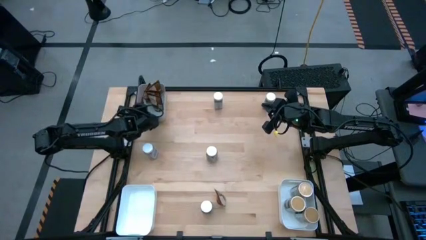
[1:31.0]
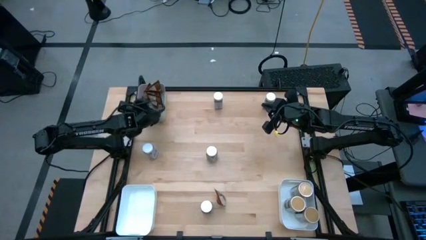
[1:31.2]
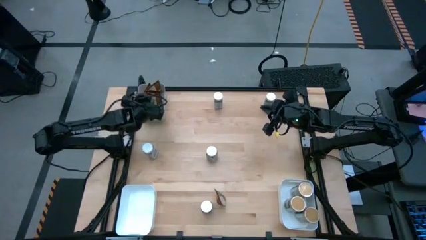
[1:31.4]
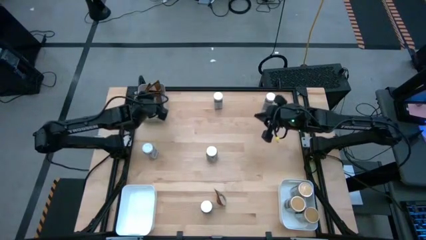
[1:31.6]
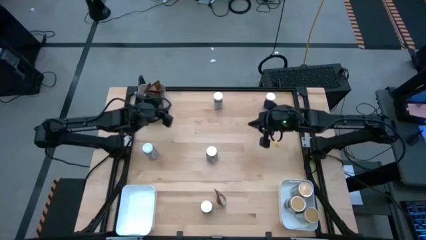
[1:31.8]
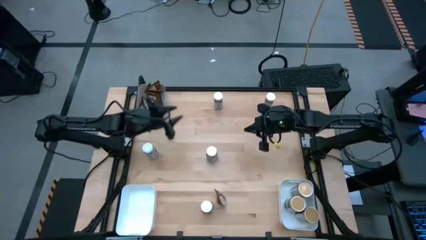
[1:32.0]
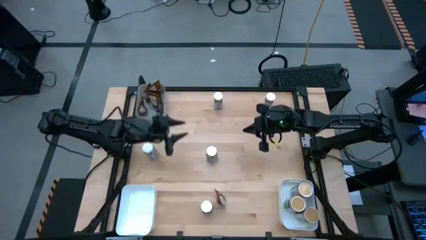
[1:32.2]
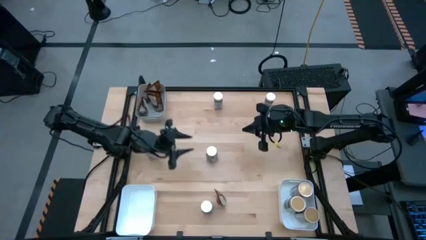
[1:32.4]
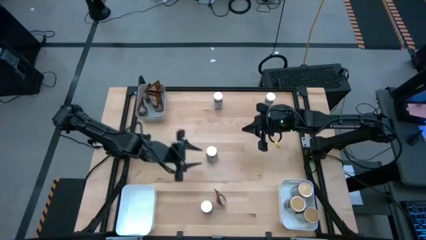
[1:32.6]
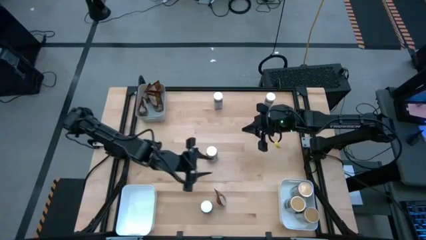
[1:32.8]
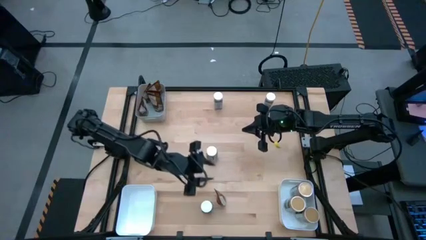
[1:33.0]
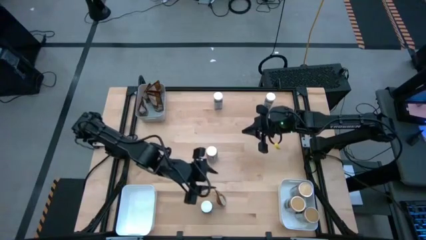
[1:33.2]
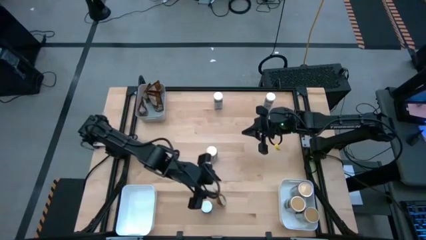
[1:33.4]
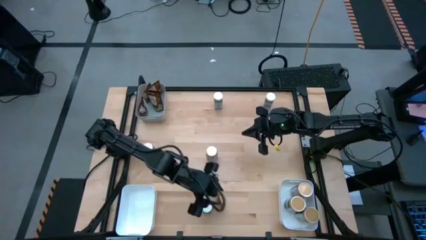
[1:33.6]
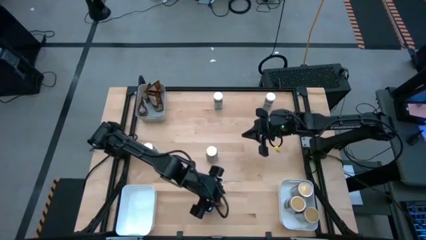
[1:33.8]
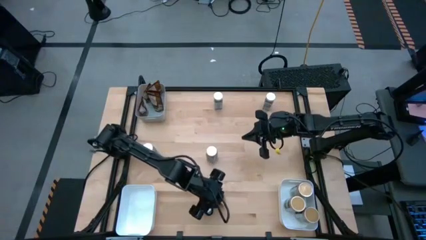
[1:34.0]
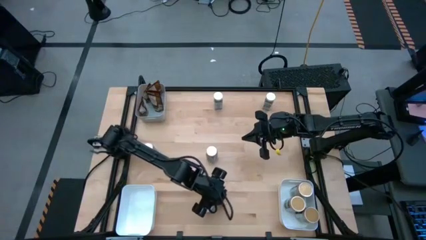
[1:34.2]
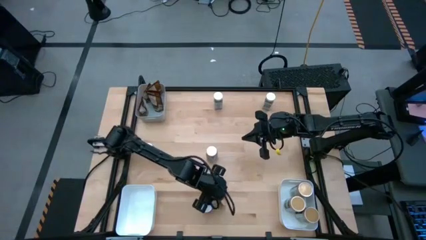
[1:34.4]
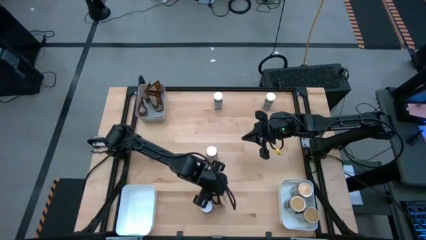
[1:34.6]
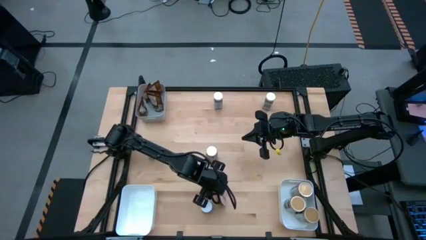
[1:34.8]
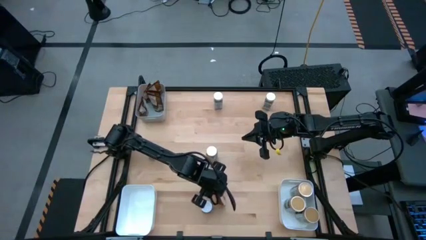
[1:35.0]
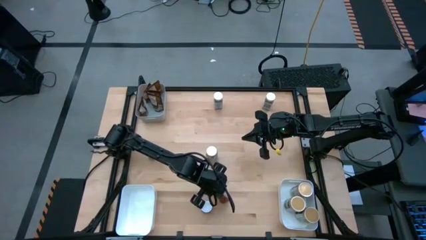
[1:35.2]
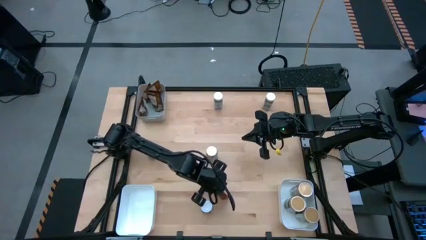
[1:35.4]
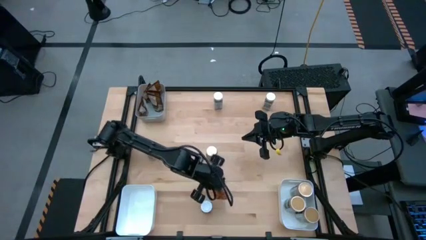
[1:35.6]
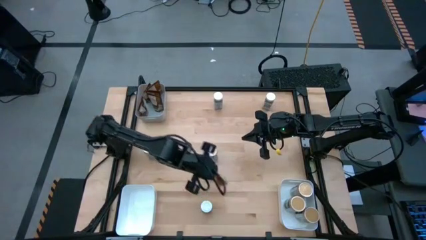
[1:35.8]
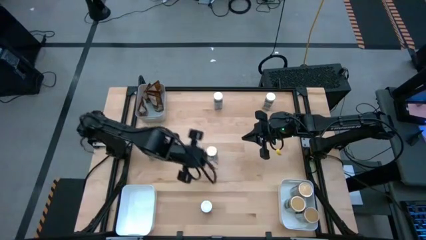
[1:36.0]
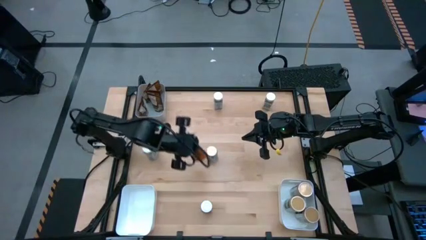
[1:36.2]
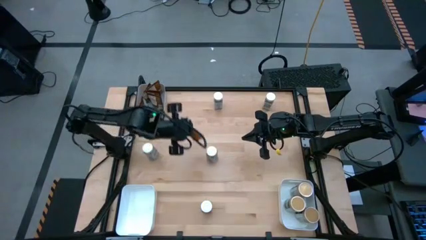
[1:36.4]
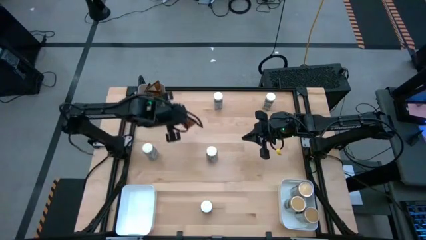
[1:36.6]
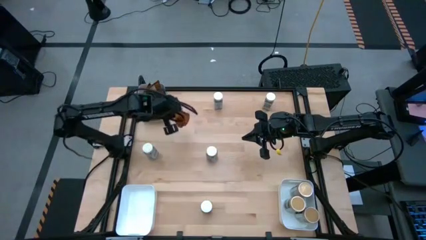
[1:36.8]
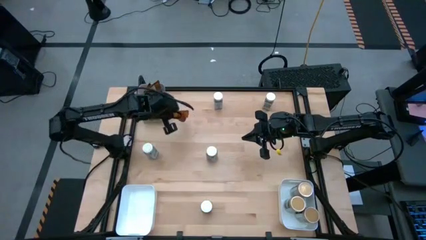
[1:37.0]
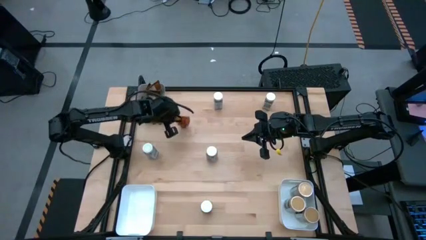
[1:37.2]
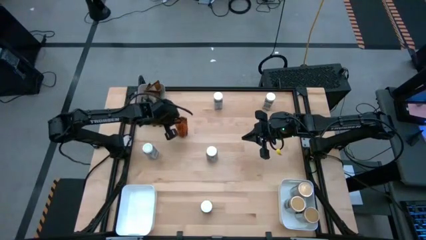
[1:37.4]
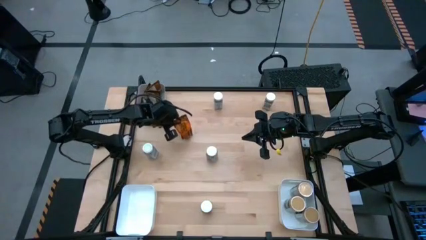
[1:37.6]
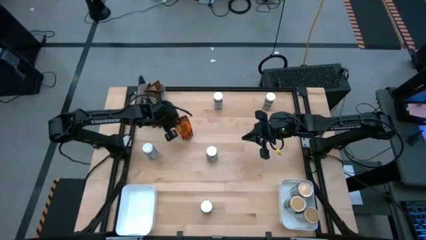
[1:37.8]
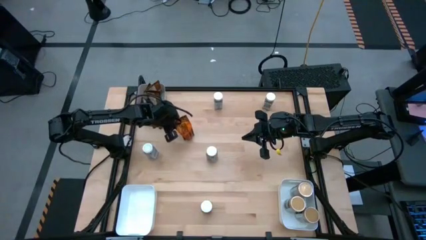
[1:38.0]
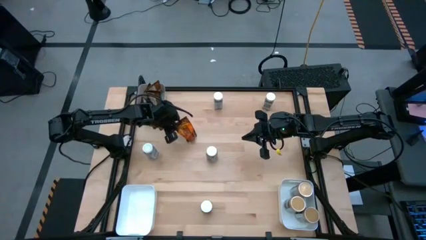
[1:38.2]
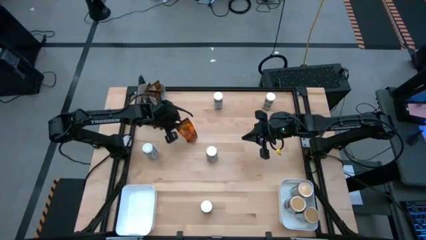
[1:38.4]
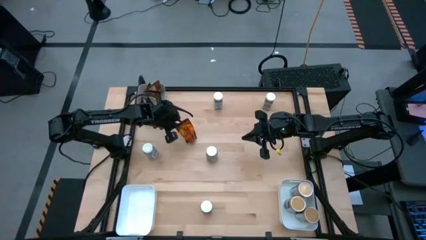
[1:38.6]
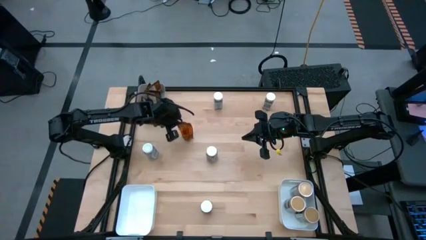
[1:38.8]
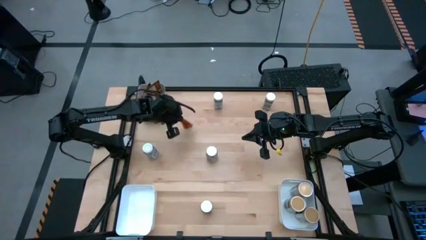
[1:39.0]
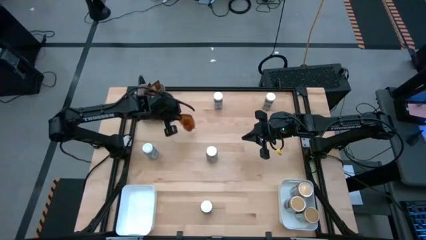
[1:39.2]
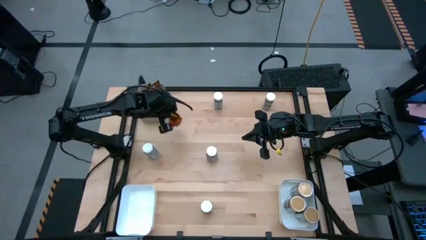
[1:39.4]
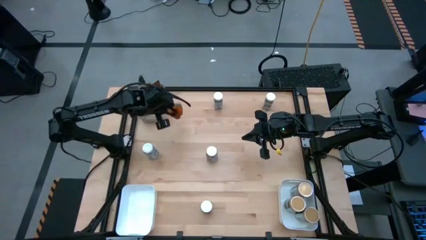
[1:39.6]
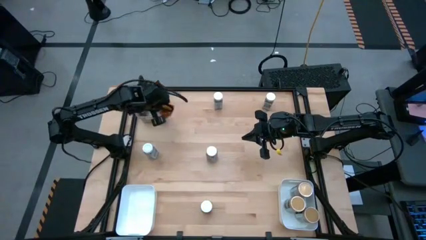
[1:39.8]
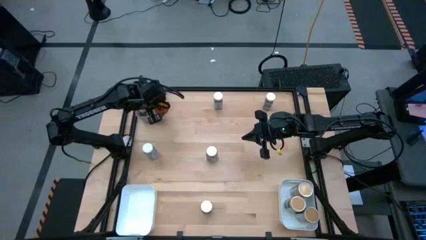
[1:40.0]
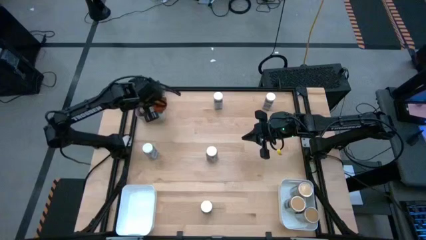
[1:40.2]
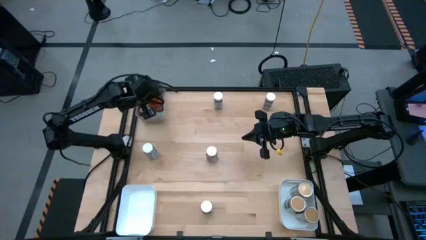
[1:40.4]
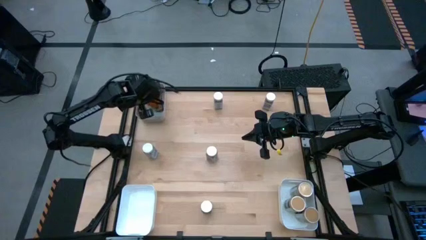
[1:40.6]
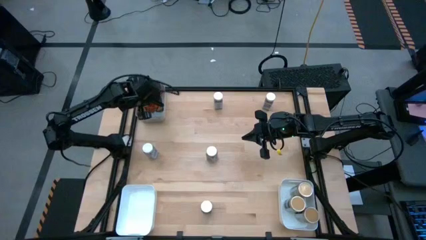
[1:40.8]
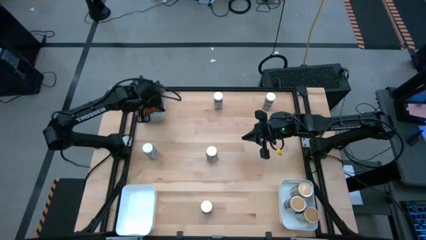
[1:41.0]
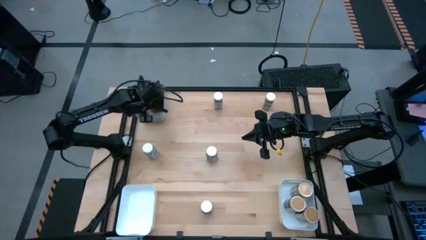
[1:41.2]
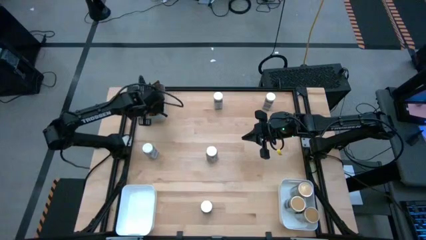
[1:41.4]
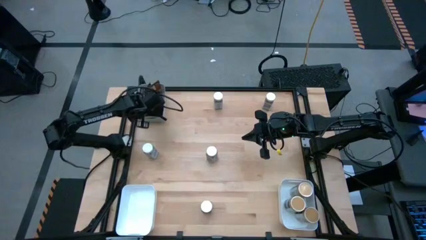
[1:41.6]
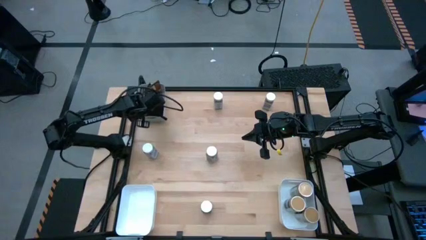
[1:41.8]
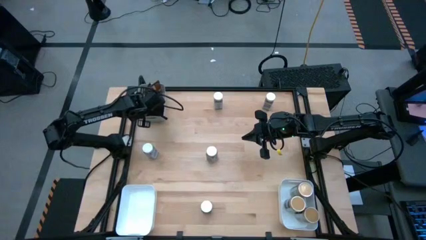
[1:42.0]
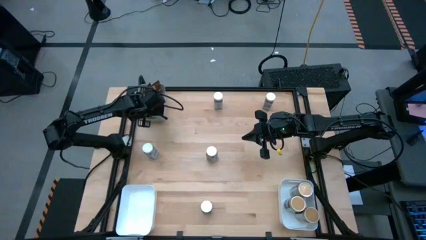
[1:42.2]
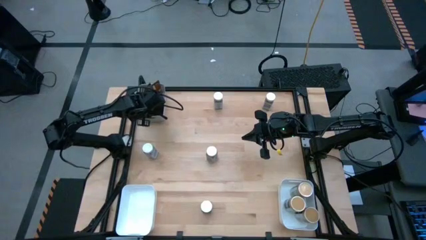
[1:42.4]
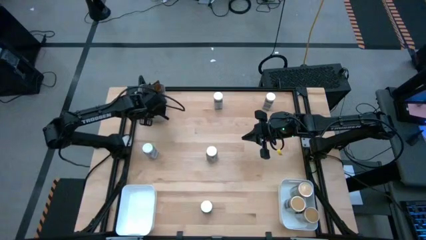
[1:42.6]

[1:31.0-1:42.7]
Task: Sort spices by type
Put the brown seasoning bag into the top left white bin
